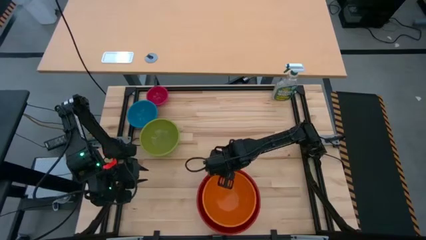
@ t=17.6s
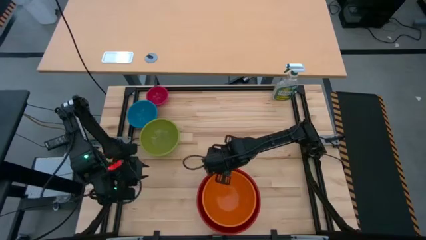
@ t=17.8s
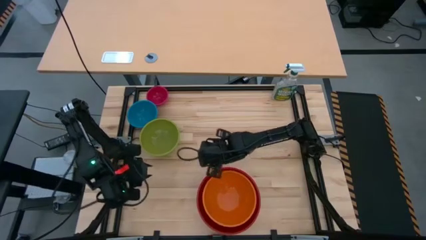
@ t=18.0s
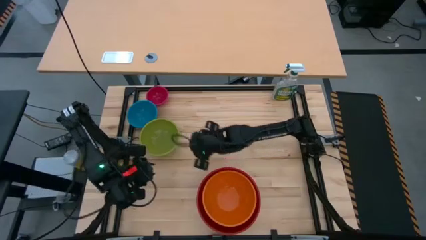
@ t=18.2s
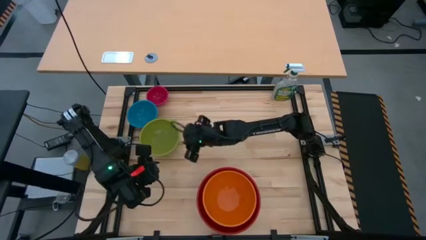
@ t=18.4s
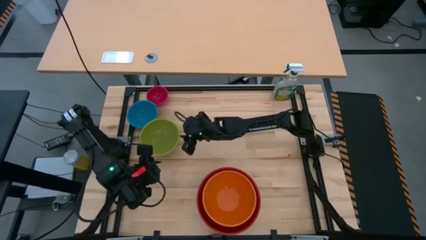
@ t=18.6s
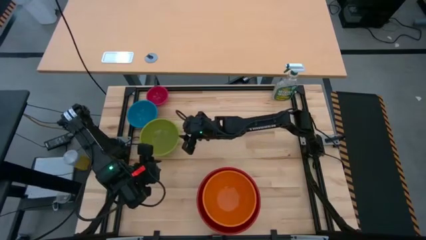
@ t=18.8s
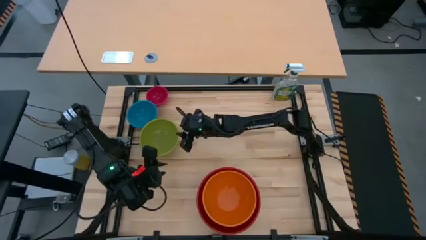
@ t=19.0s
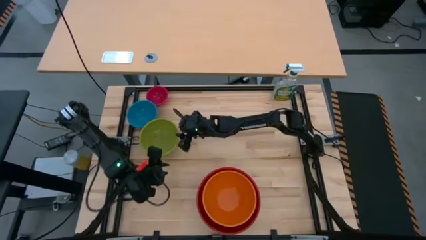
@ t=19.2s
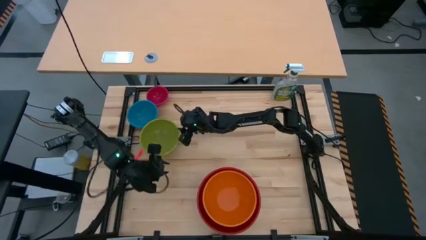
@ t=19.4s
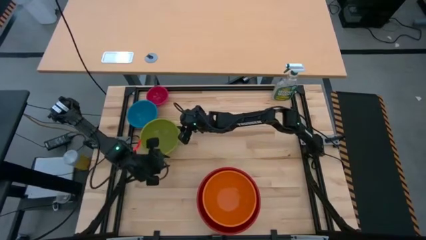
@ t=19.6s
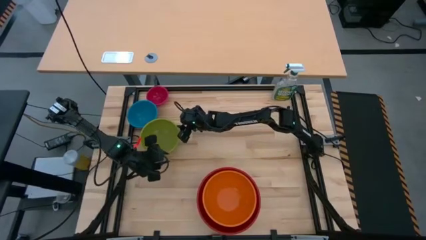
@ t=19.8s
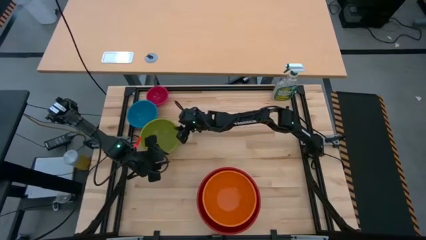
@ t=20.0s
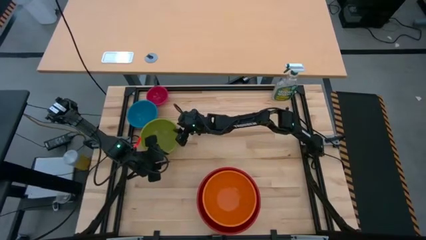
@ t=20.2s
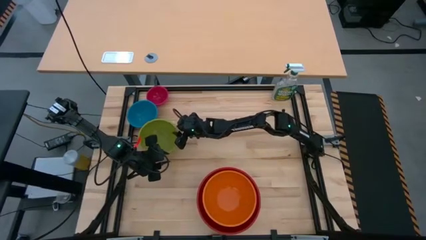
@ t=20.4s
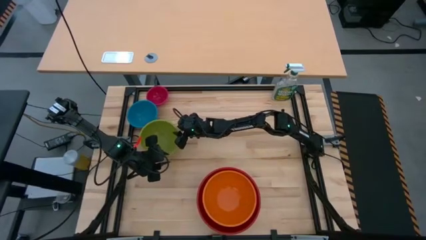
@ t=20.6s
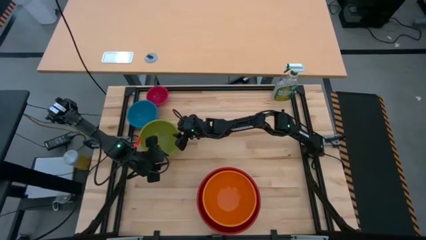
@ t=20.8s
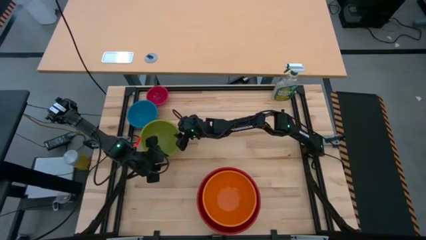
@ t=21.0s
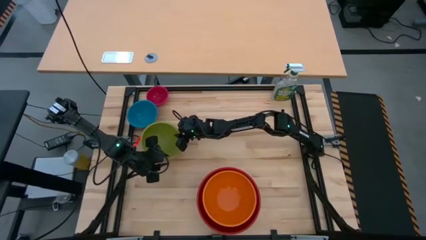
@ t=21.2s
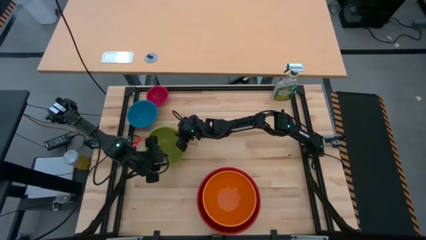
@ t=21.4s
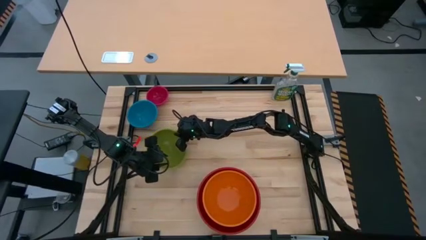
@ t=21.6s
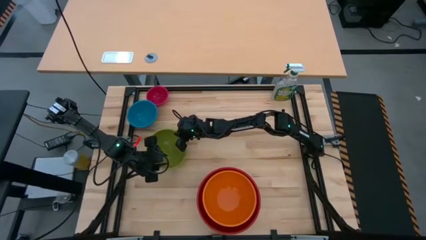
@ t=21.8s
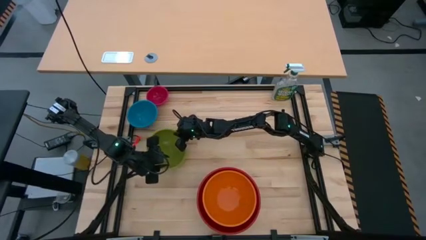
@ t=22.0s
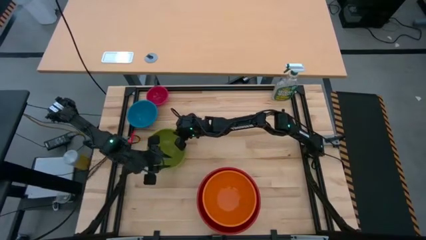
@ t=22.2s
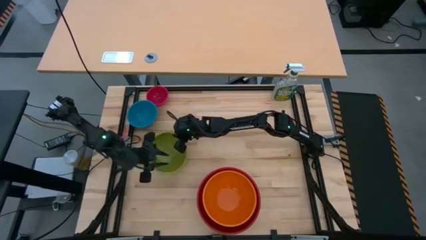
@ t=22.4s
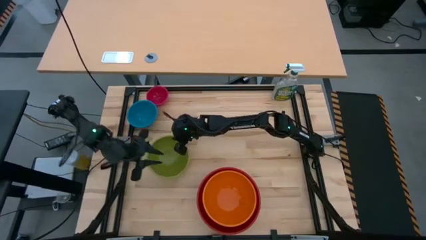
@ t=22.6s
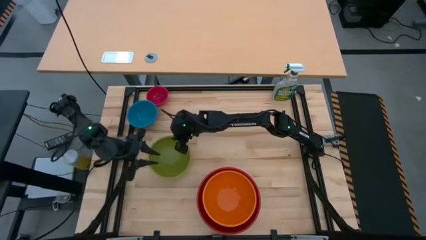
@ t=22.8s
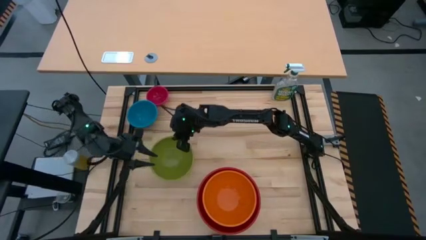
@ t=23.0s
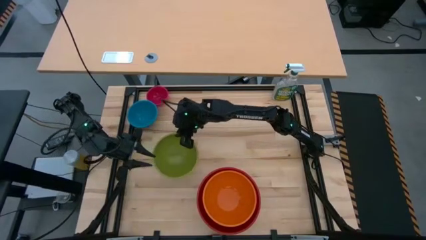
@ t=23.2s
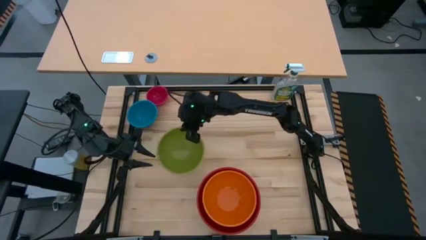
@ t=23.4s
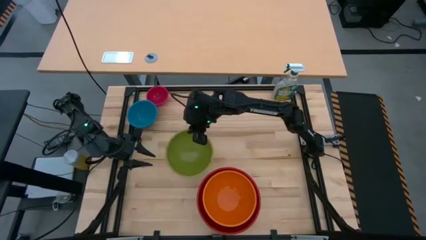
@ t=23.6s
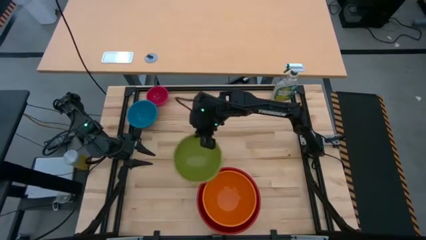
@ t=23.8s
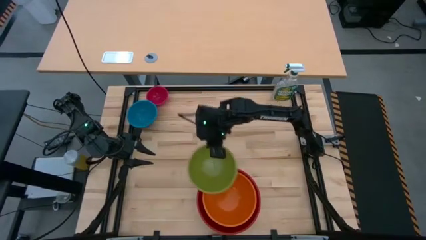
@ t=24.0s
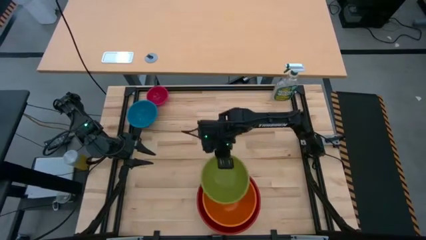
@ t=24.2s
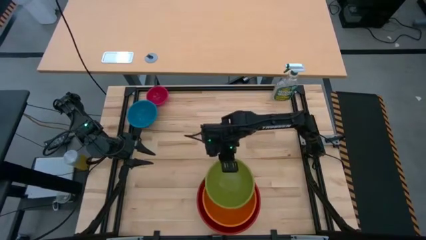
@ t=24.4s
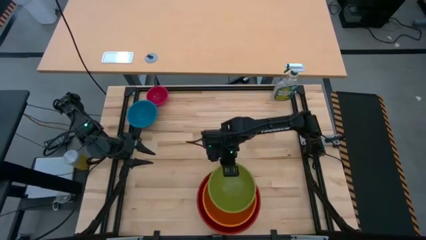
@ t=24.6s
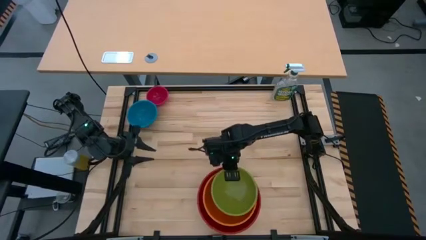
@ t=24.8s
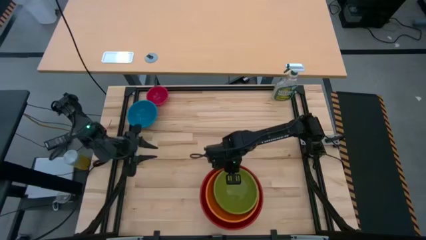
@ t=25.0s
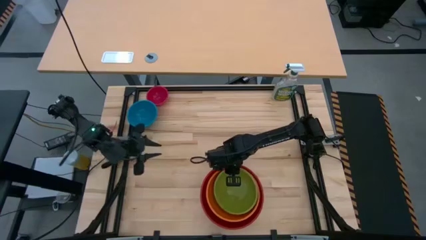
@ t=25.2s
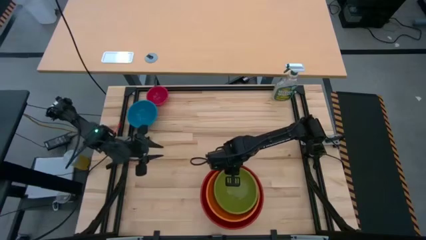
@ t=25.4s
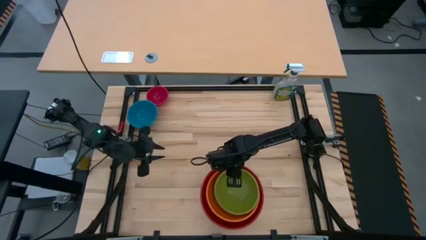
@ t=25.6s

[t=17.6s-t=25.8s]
Stack the green bowl on the orange bowl

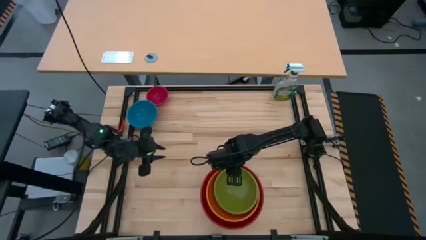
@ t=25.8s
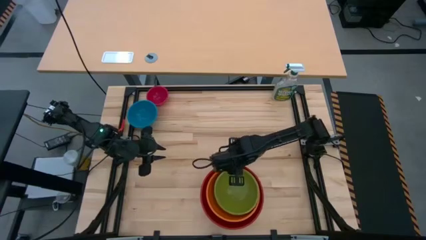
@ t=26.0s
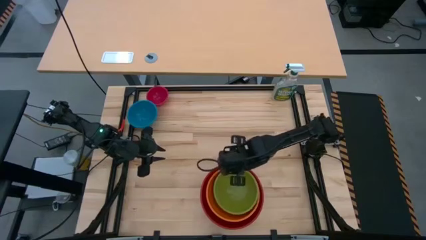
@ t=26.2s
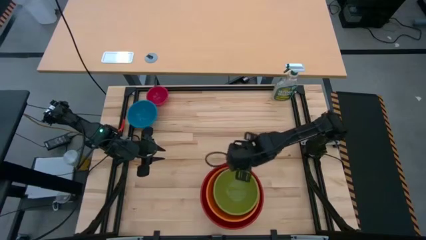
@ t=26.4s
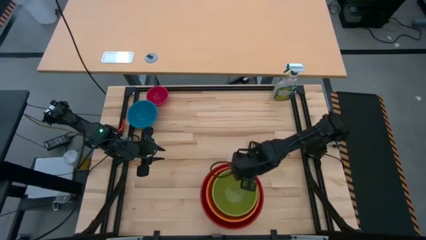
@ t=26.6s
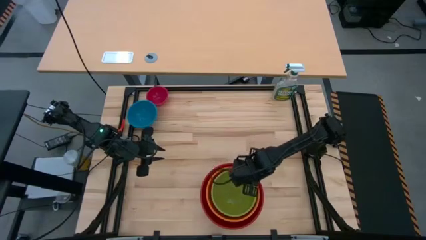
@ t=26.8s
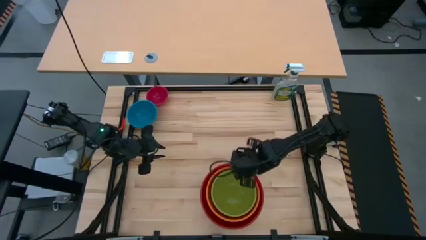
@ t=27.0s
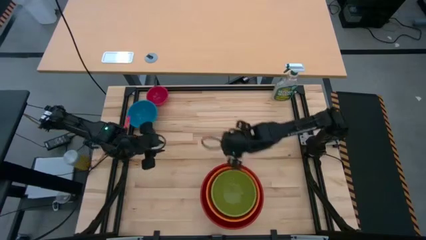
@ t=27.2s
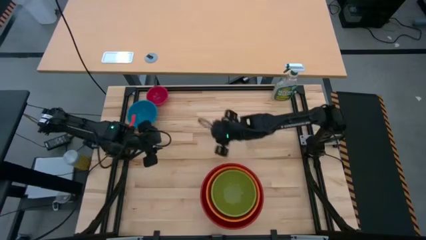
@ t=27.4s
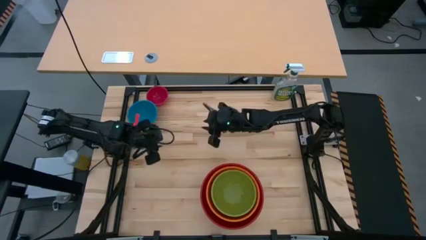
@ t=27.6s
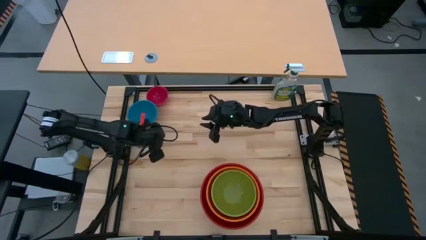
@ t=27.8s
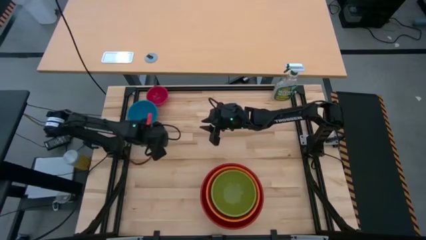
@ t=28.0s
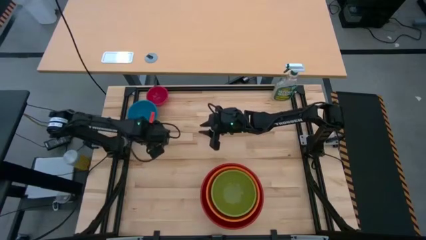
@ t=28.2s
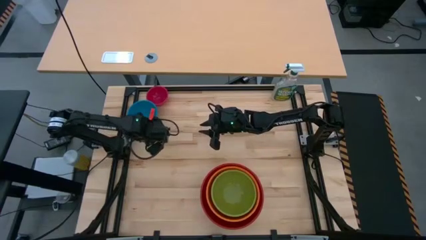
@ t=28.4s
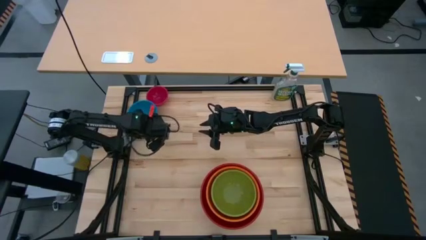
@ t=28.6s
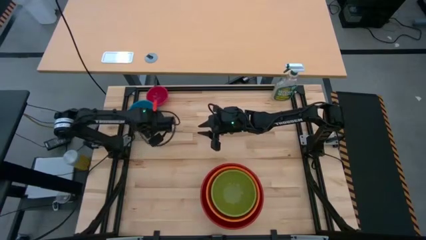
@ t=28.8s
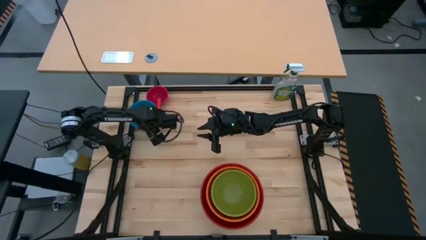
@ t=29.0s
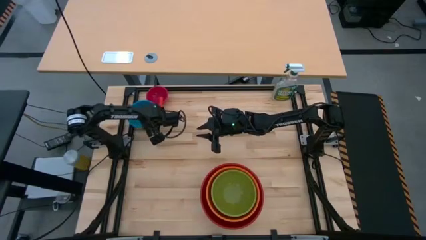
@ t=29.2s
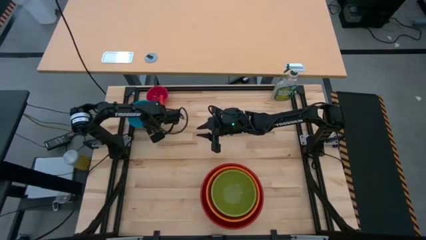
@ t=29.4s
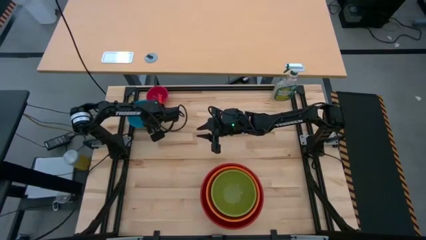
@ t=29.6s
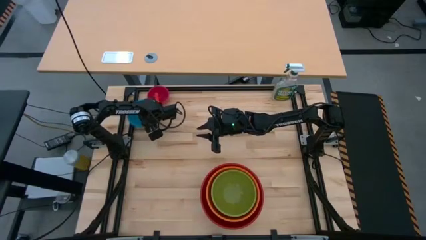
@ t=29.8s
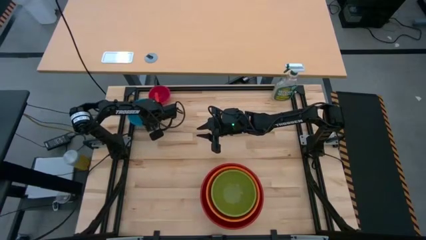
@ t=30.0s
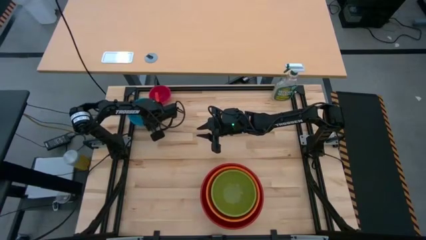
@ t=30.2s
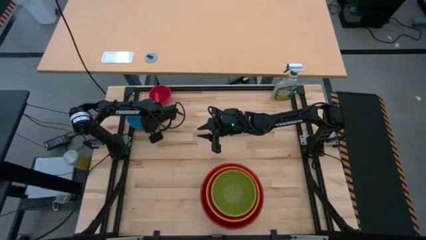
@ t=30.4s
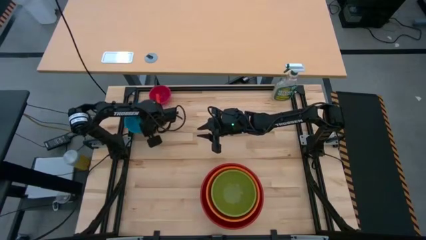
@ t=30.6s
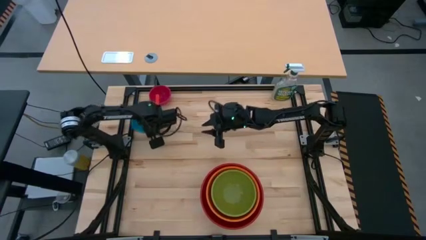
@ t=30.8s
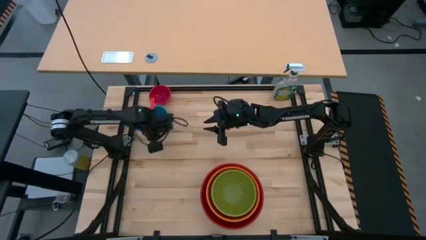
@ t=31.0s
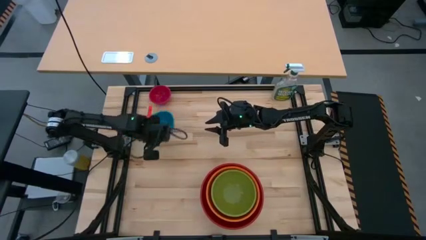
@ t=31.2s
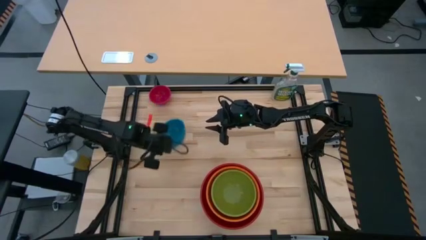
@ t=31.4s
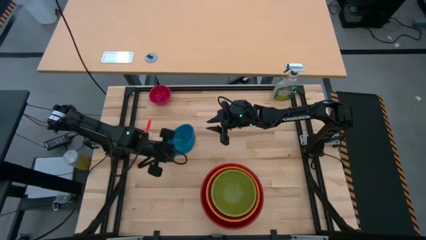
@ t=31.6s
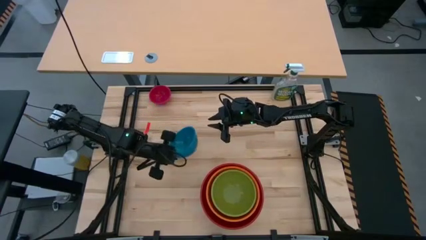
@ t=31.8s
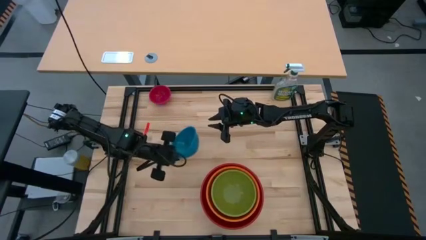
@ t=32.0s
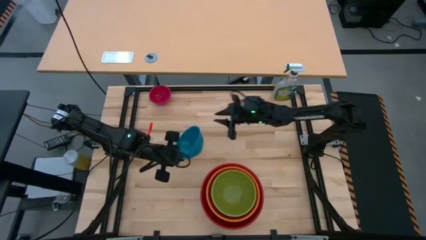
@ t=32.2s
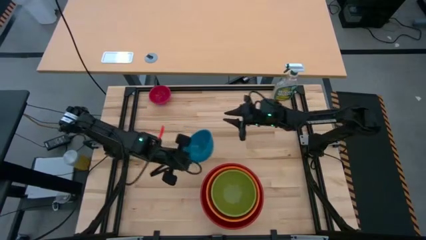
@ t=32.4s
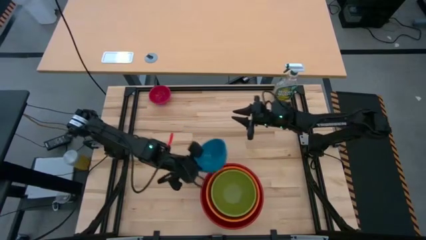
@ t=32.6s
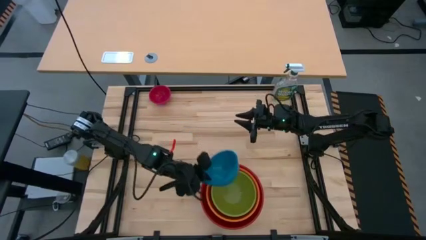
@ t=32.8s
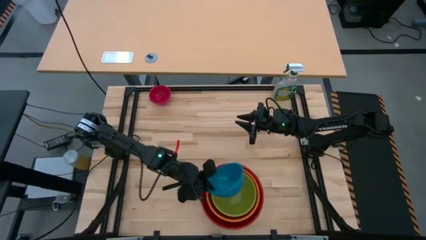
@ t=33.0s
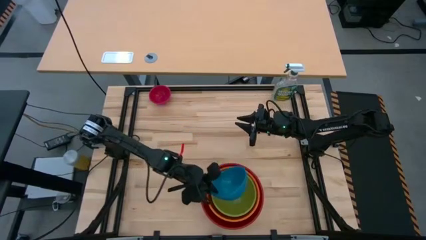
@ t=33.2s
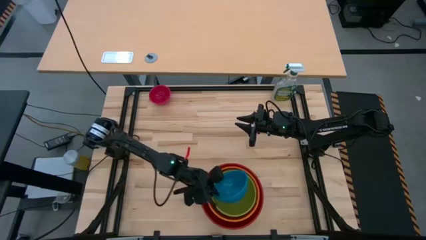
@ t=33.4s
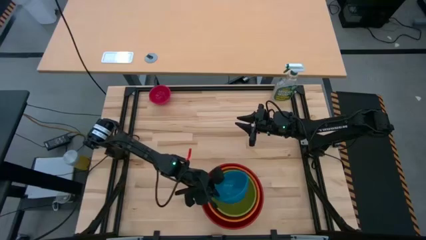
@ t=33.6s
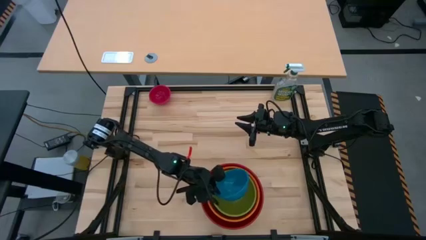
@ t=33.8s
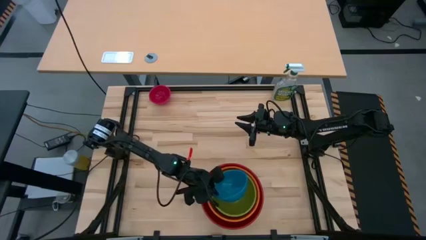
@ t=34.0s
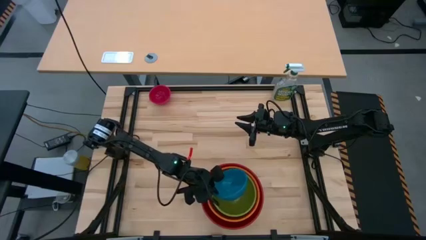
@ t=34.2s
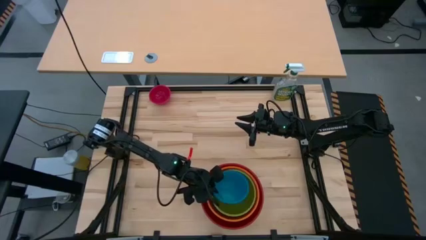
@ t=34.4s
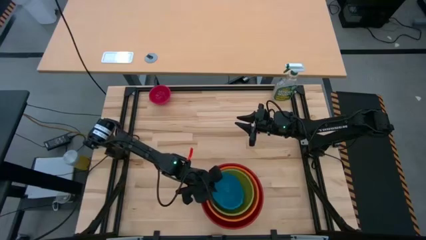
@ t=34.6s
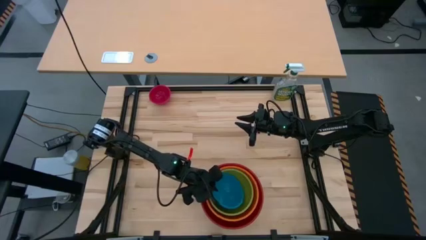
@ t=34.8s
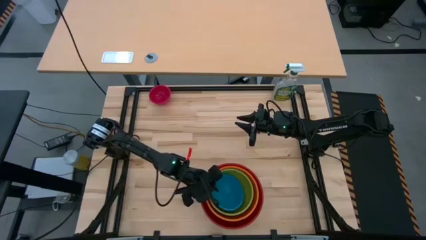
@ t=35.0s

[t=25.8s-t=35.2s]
Stack the blue bowl on the green bowl
